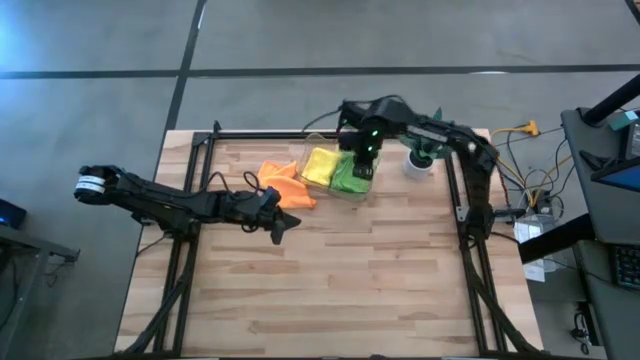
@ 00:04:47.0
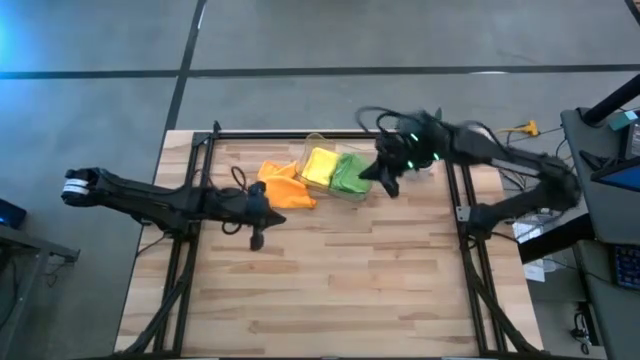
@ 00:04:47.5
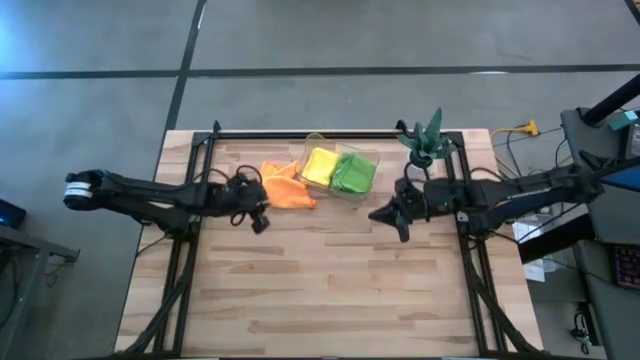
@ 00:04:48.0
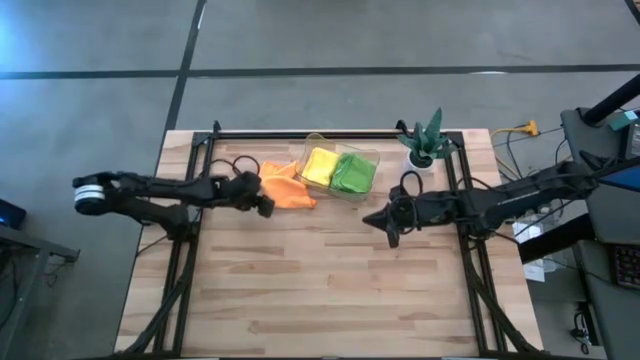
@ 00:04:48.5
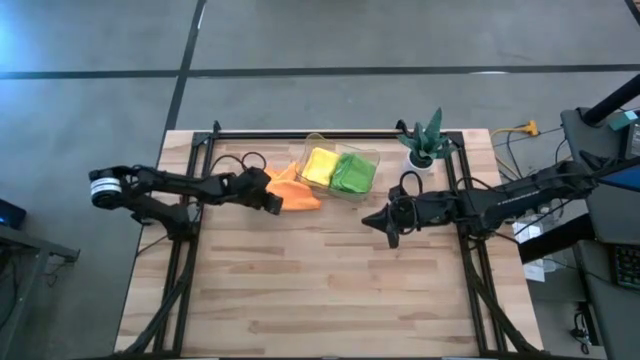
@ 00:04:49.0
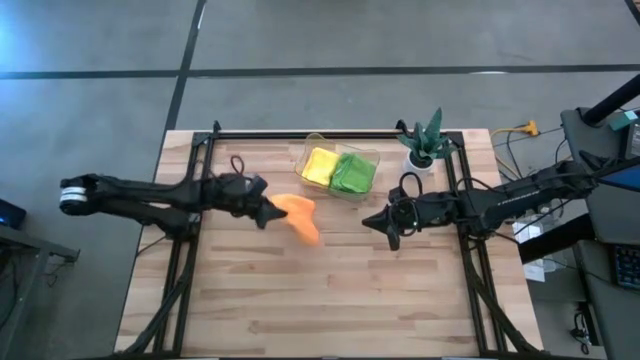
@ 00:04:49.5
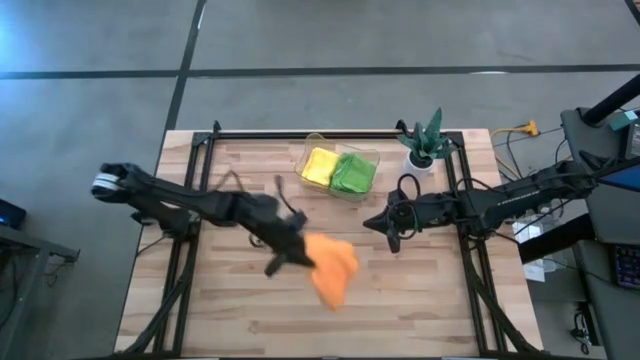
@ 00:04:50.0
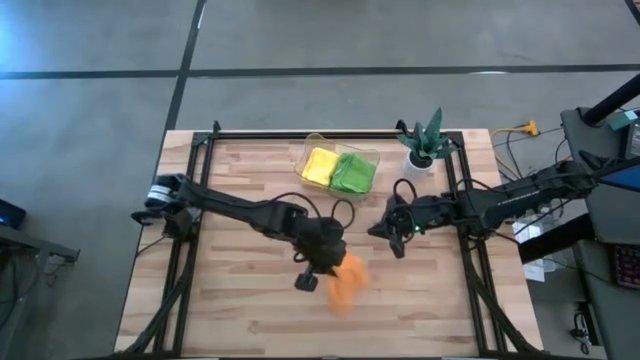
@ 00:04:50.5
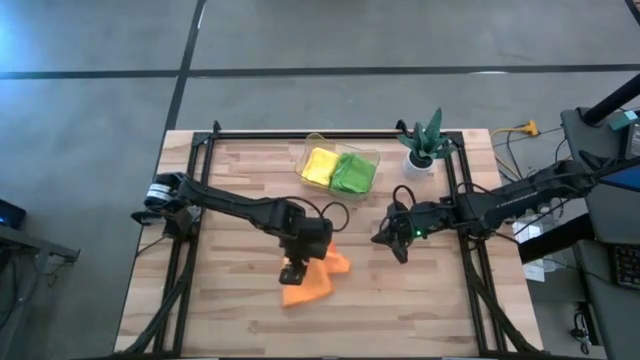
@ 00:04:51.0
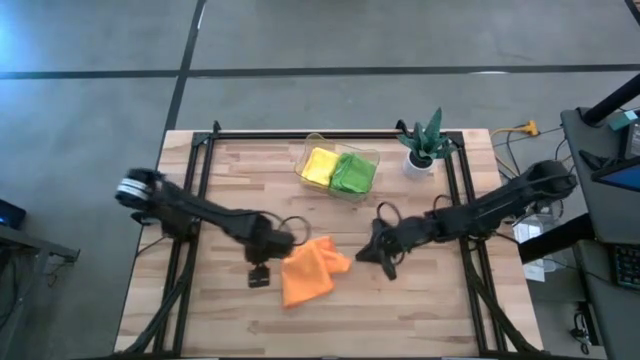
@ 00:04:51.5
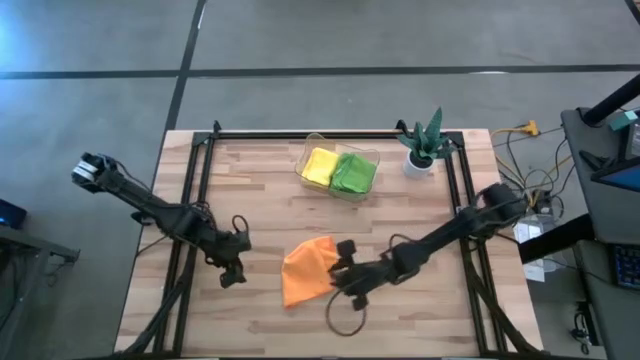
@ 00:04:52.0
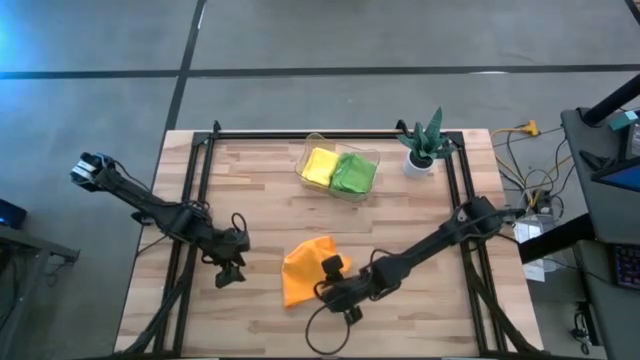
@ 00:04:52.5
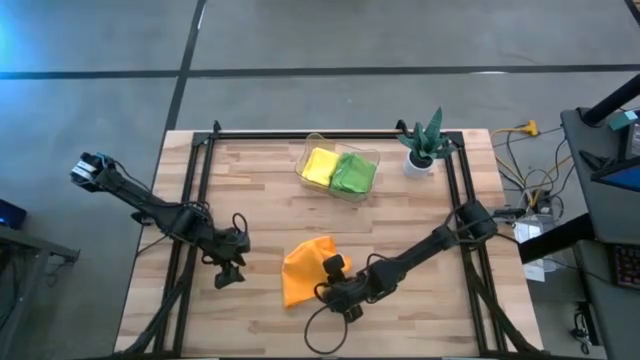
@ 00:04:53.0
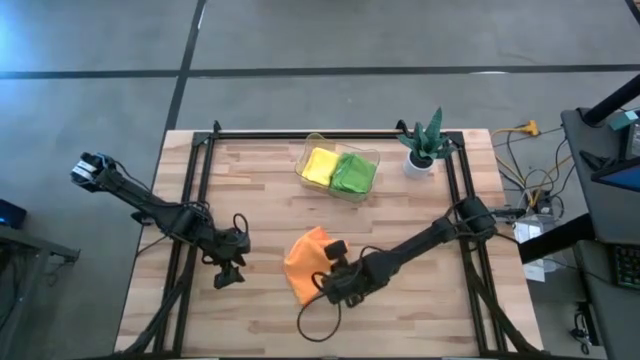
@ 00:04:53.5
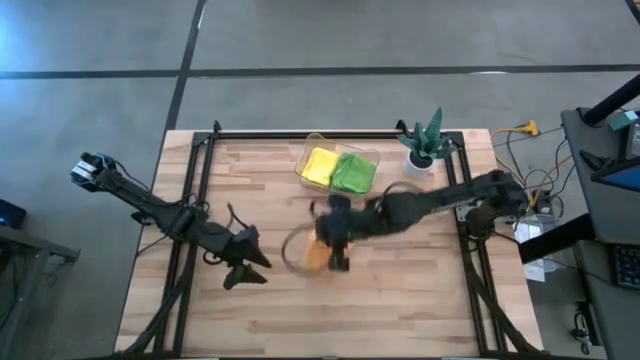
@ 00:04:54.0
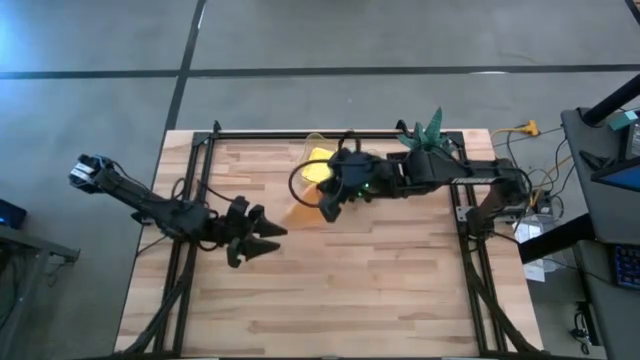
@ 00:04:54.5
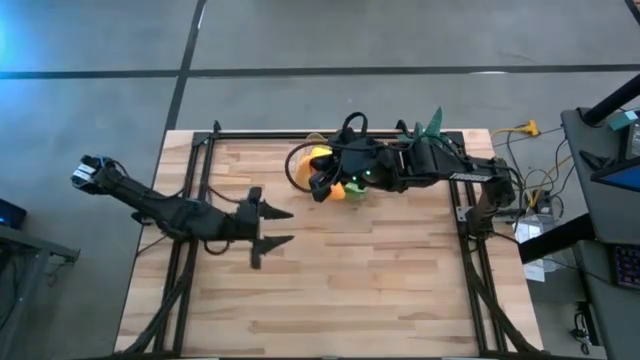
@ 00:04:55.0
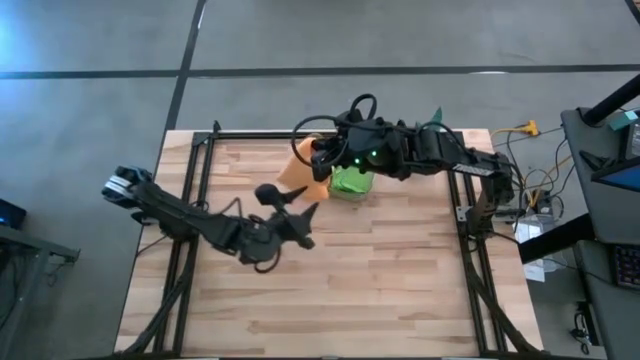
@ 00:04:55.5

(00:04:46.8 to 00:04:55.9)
Task: Fold microfiber towels
Fold the orange microfiber towel

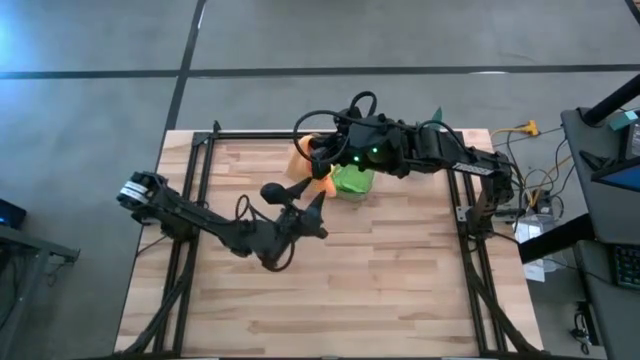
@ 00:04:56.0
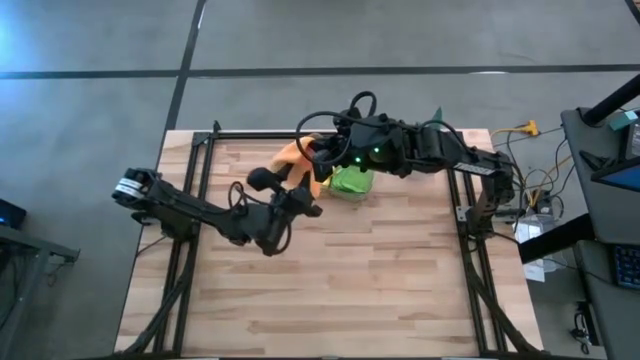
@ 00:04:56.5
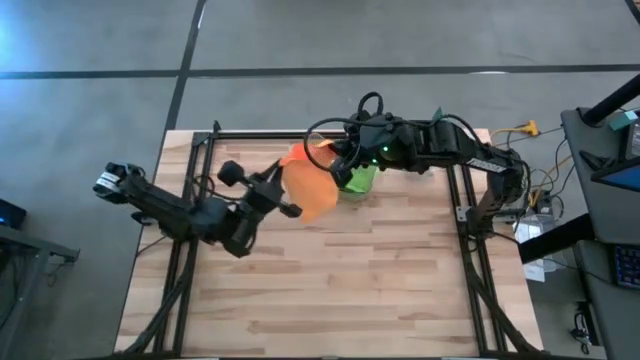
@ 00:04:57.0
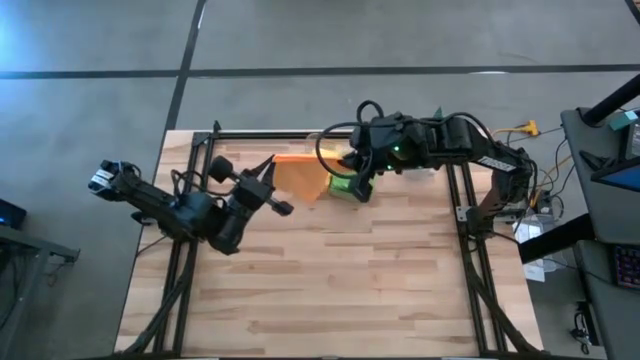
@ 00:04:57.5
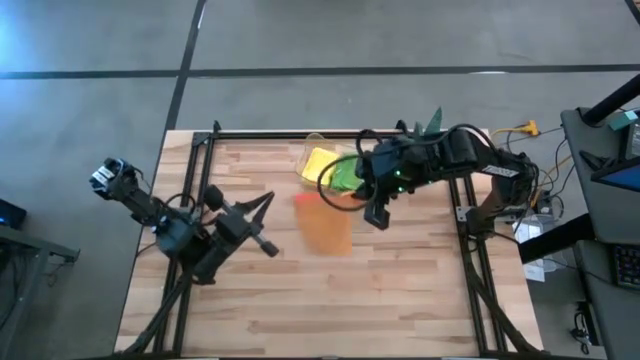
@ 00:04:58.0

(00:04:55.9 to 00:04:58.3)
Fold the orange microfiber towel

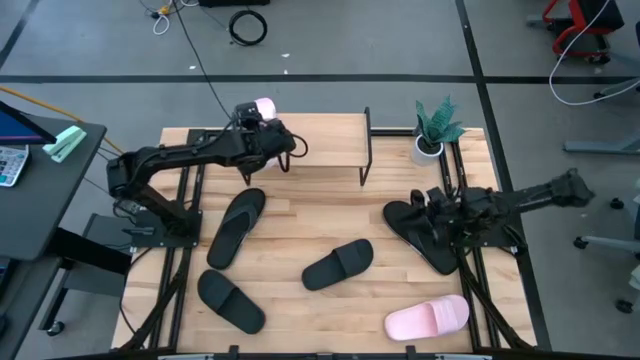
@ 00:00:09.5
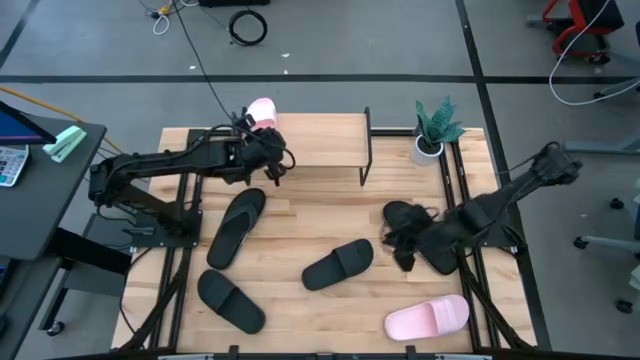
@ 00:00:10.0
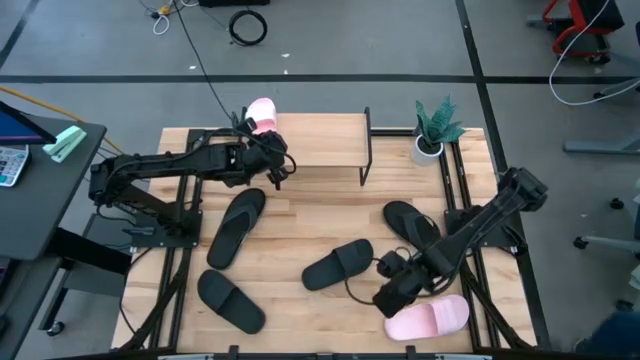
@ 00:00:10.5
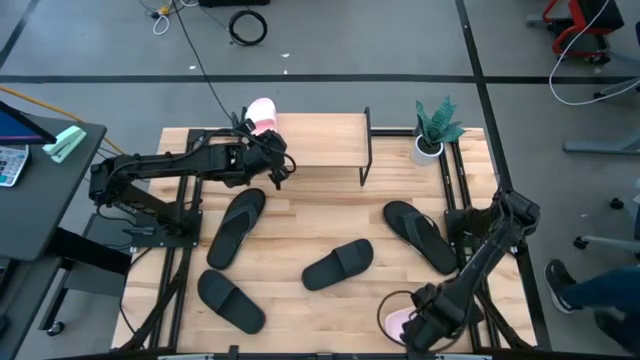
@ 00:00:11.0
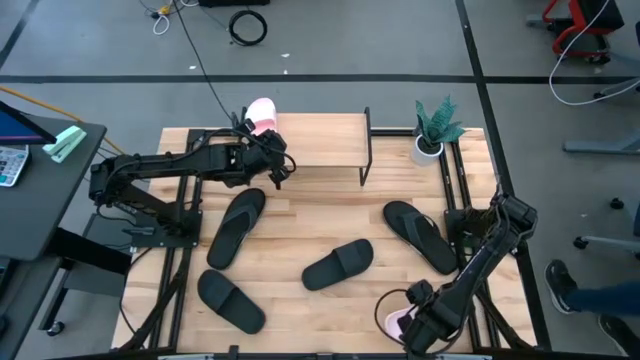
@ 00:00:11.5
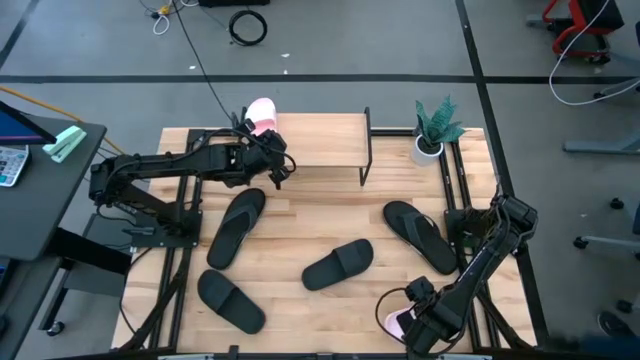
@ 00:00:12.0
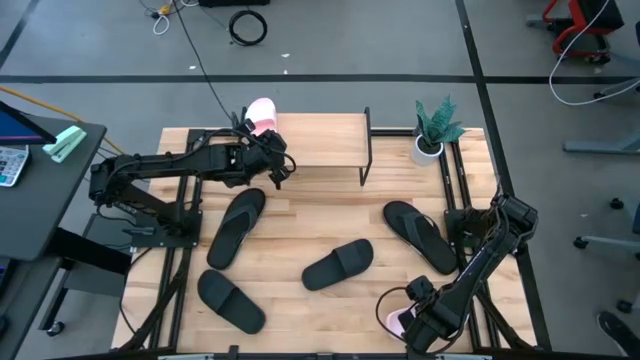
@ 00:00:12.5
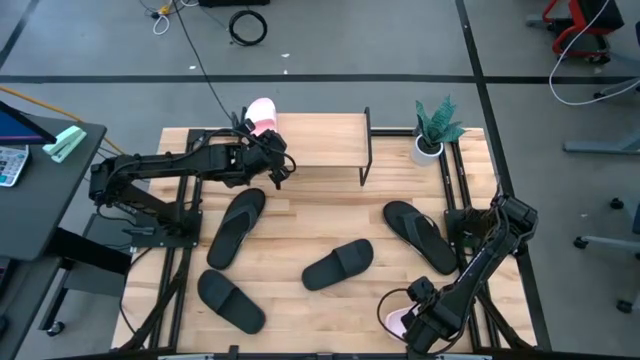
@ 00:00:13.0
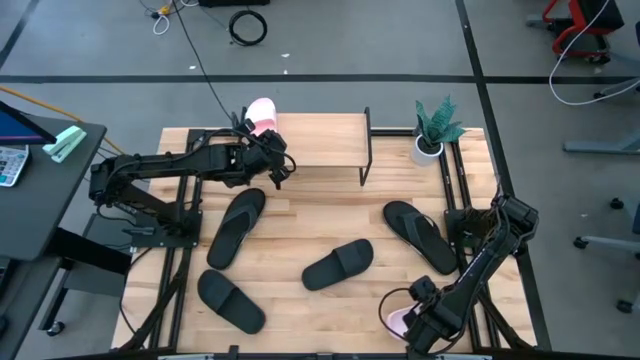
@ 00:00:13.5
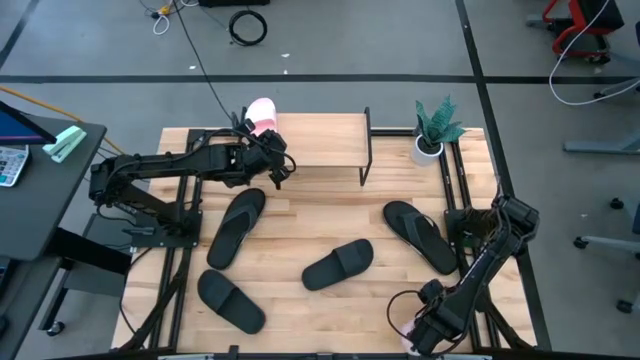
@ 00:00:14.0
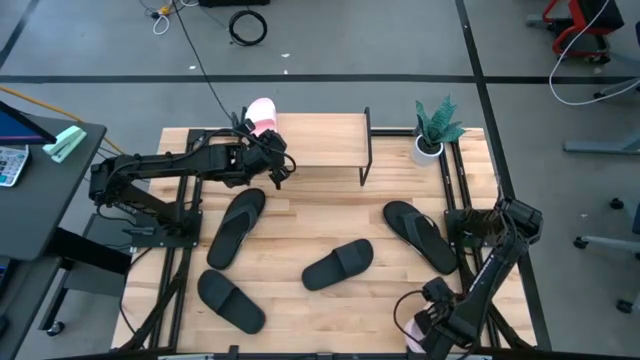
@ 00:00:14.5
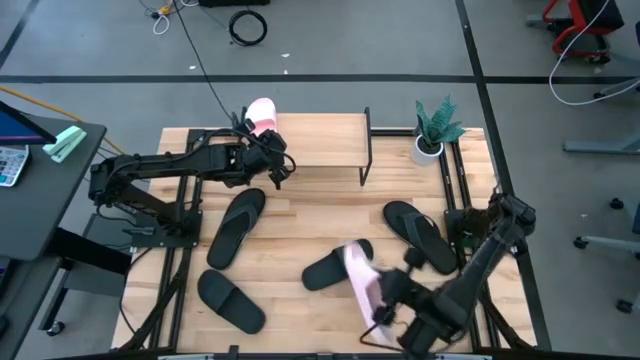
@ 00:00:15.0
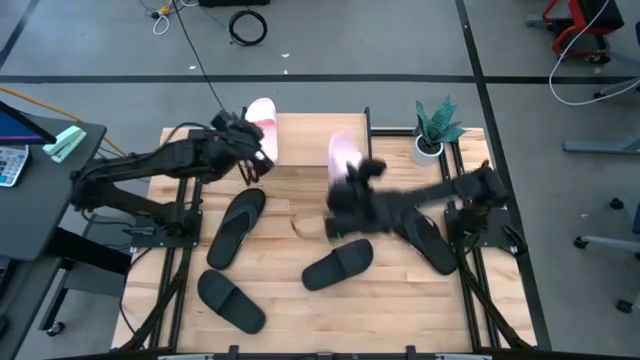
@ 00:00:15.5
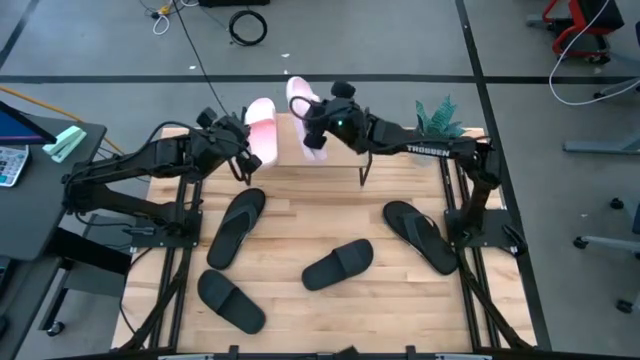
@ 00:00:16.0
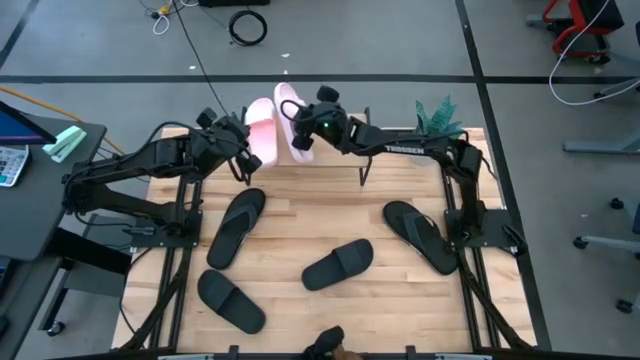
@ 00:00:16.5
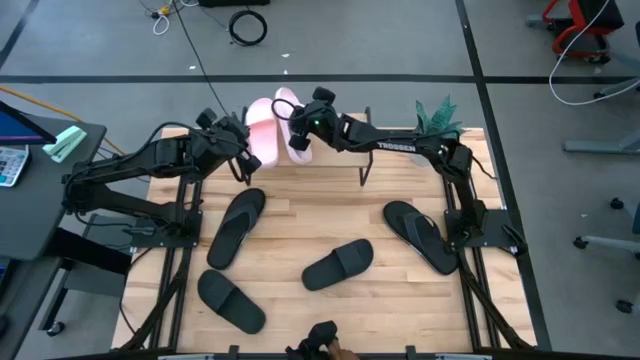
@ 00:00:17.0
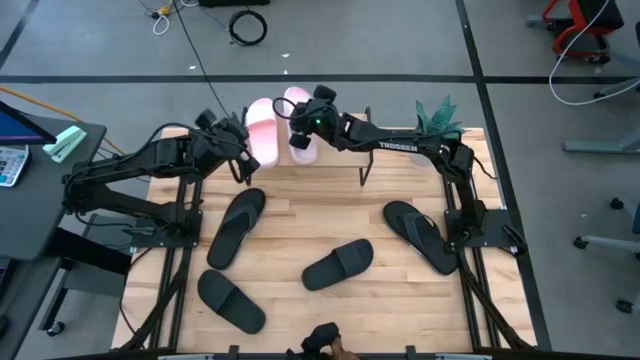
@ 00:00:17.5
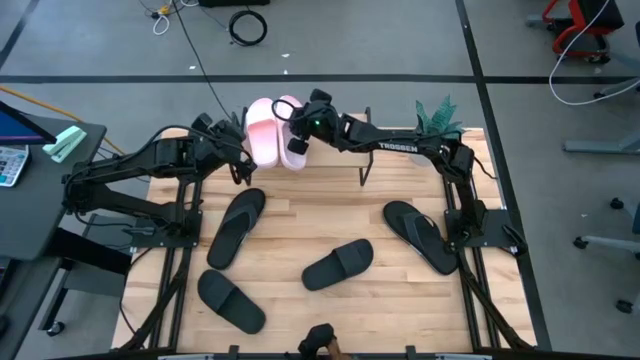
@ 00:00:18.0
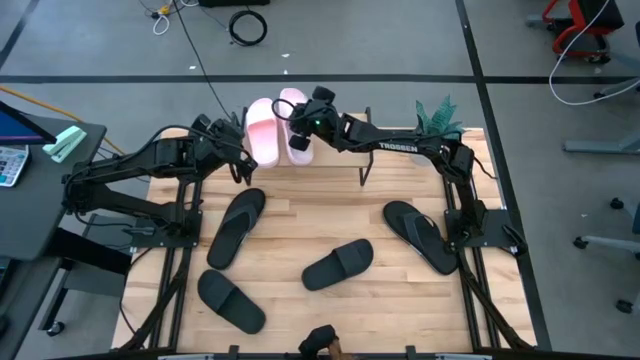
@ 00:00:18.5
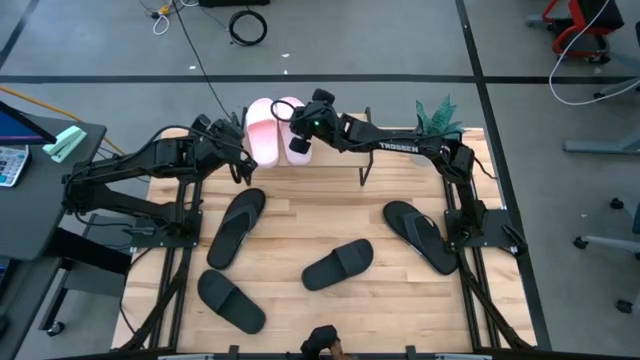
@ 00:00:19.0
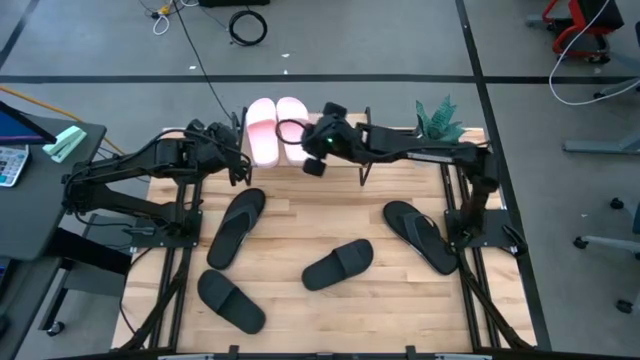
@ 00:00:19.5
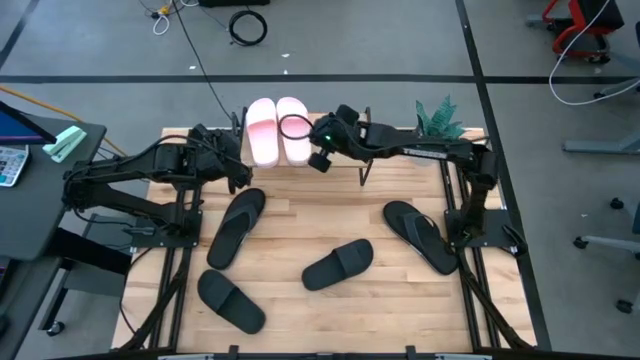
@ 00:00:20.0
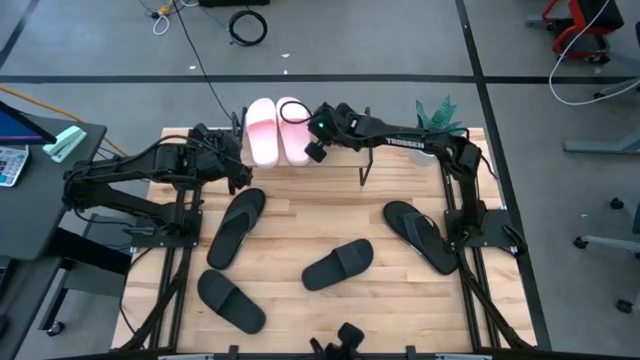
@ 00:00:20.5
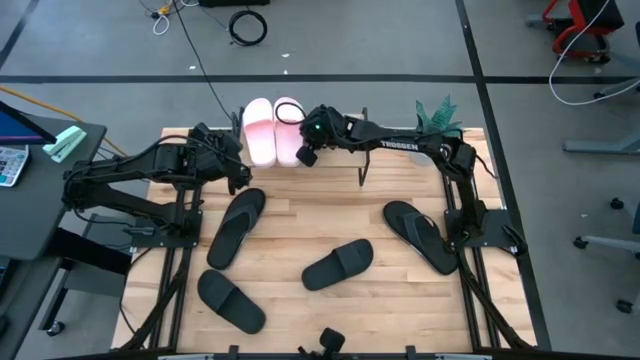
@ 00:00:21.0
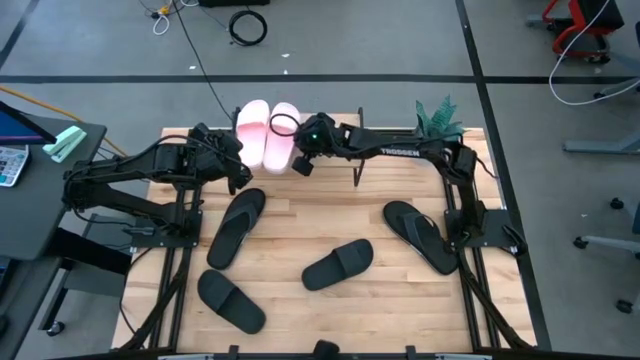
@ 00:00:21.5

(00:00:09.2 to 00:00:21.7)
Task: Pick and place slides into the shelf
Put the pink slides on the shelf
